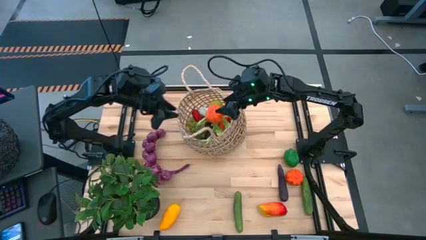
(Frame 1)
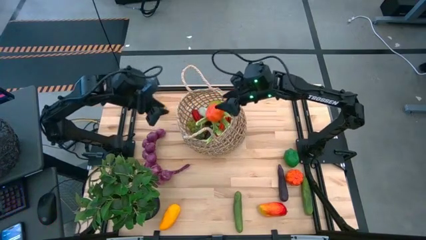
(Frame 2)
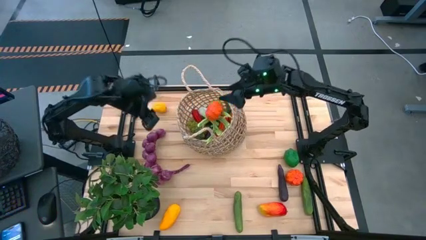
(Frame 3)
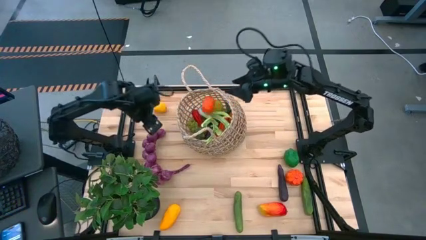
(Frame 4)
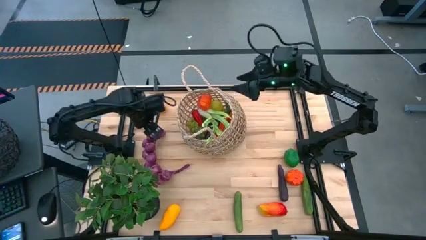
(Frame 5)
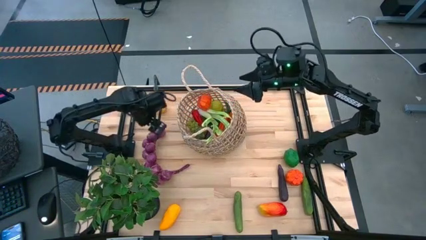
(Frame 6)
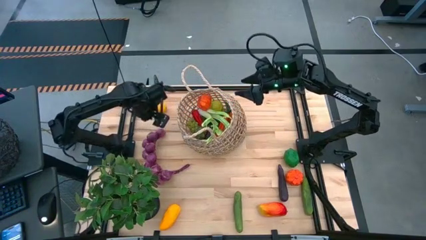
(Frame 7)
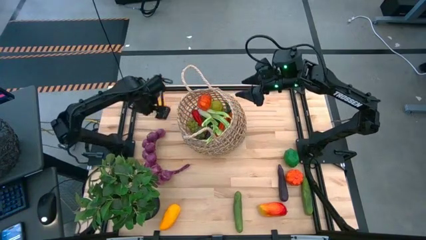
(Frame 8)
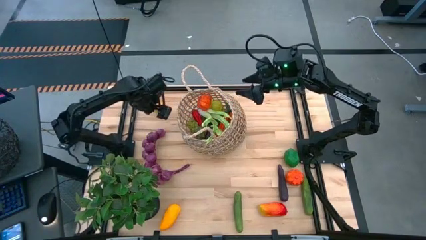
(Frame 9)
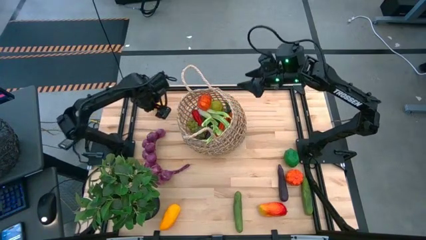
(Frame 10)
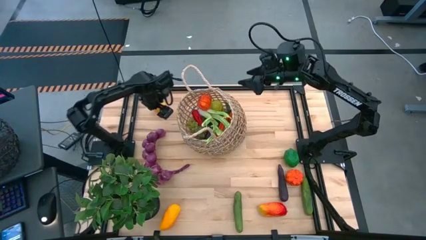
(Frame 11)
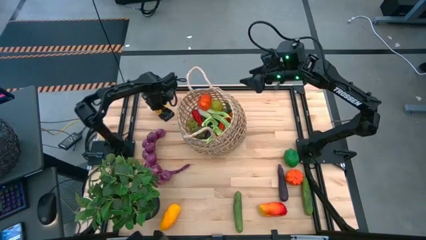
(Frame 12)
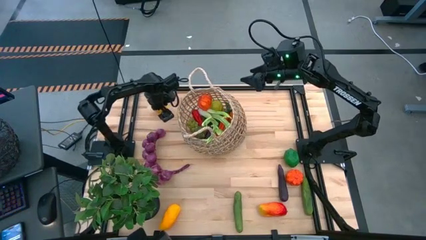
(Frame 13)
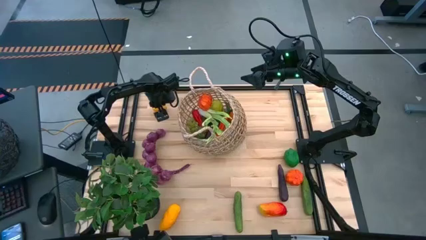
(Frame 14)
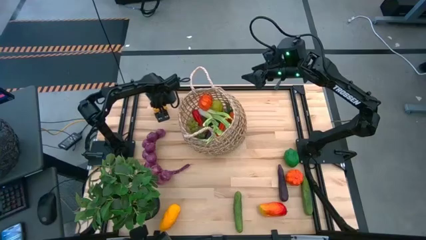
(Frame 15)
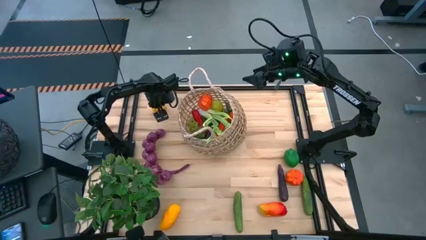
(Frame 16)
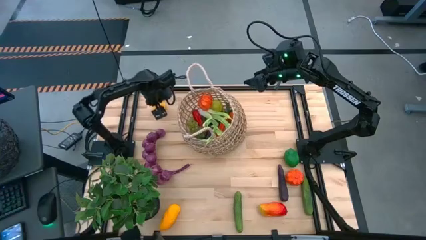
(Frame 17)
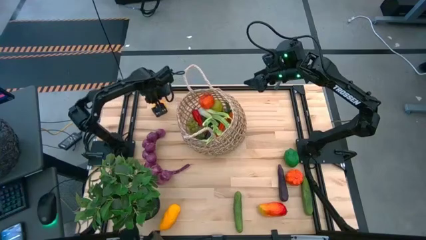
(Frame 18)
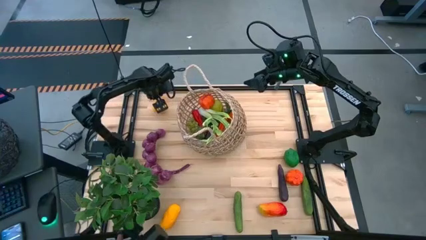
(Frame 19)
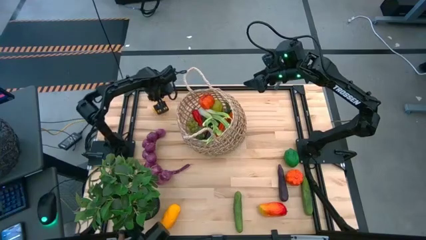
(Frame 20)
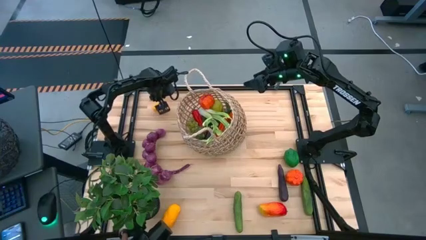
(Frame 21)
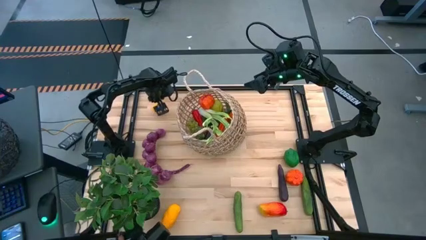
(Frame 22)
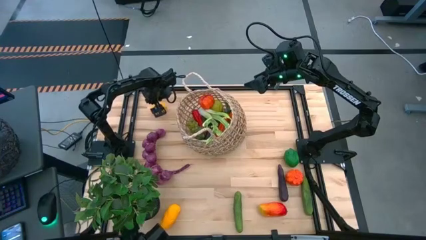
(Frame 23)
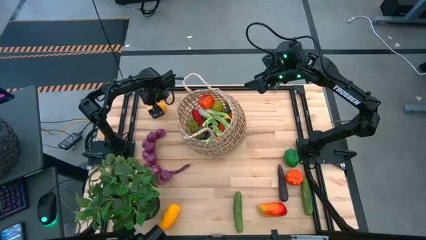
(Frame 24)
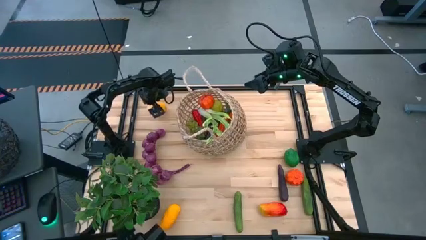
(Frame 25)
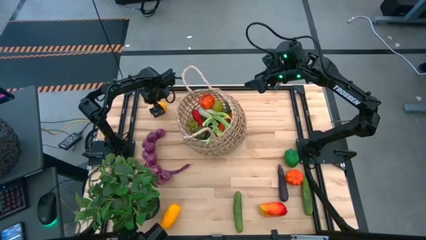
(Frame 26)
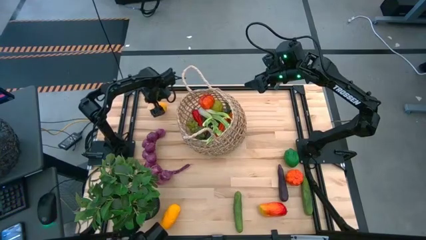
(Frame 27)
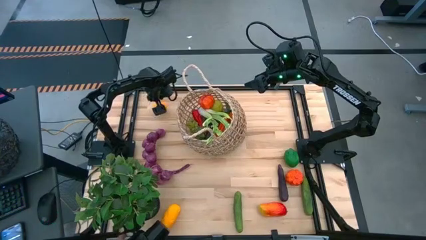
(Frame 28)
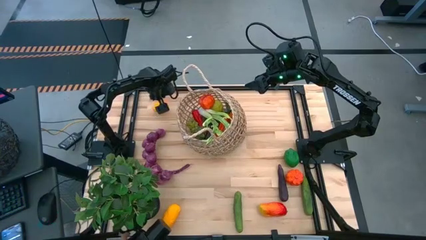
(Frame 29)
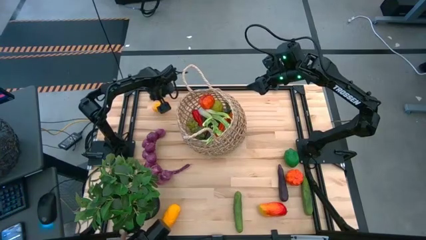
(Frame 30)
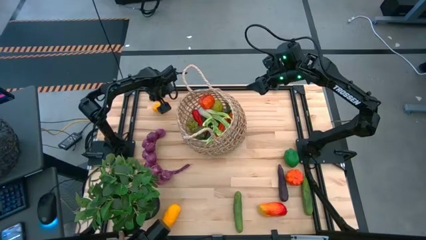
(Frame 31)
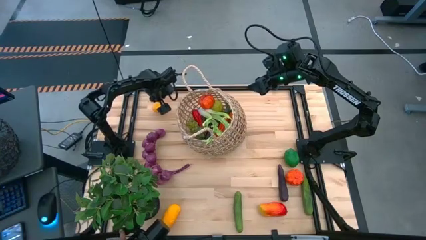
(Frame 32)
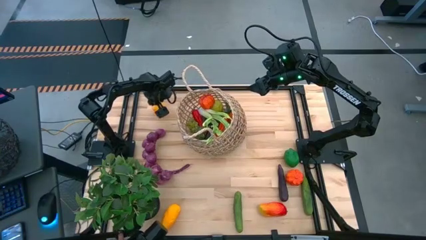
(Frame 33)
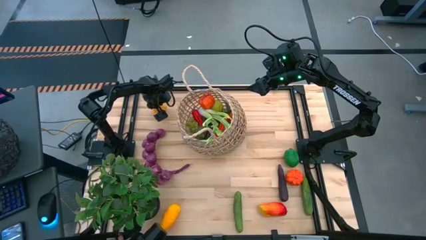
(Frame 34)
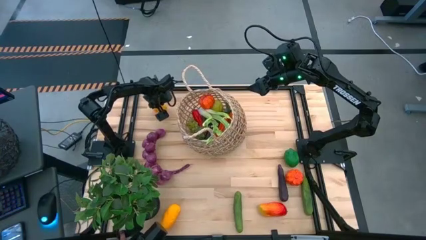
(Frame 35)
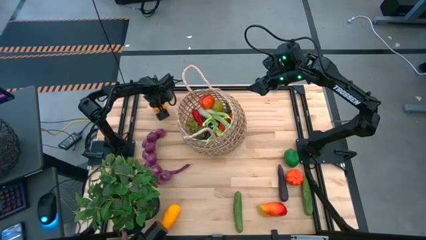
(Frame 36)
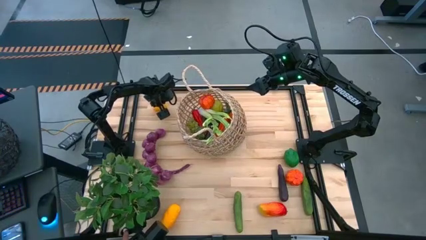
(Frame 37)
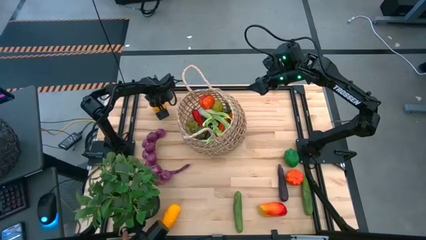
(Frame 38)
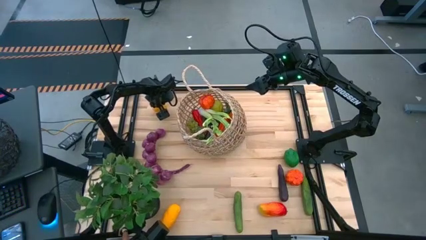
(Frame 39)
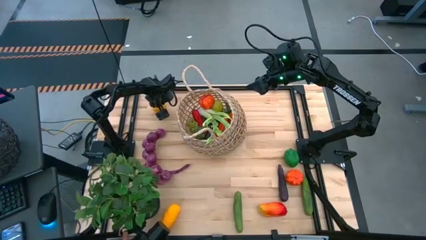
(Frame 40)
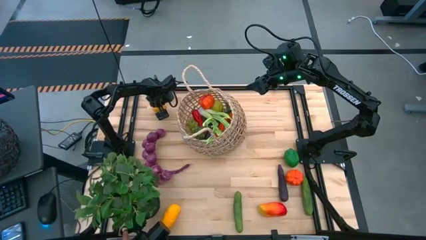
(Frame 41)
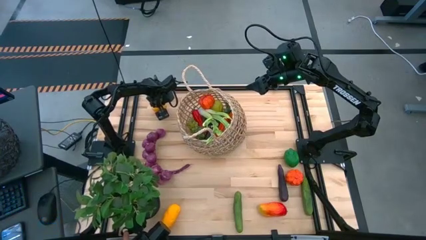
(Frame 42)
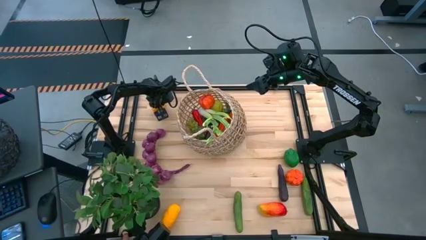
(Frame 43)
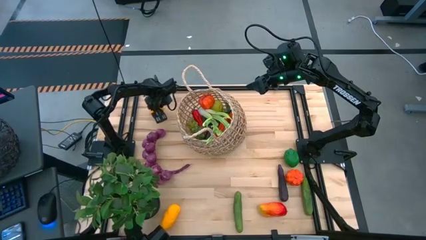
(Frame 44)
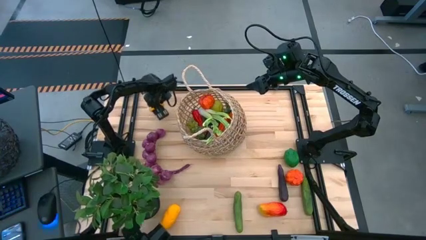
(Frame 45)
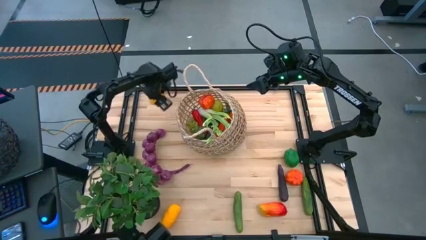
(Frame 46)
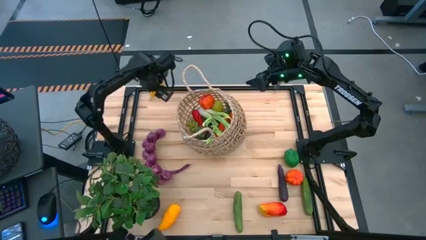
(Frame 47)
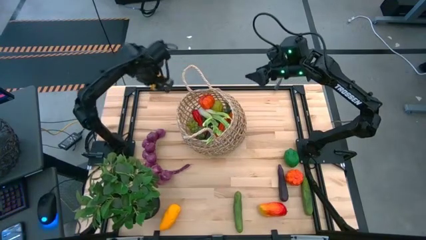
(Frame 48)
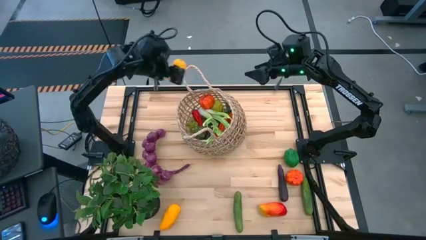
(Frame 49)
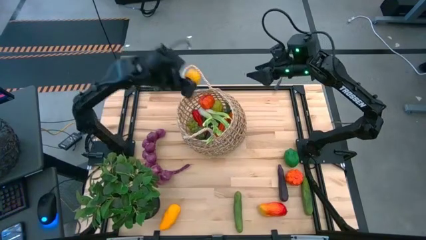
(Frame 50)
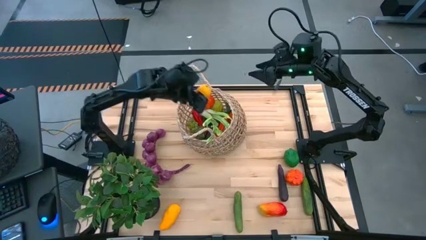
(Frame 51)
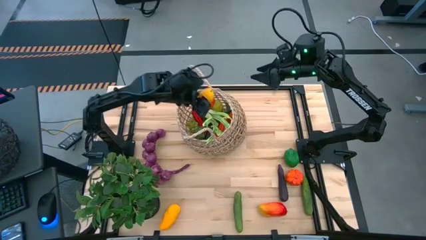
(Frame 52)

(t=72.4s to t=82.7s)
Task: Build produce basket
Put the lemon into the brown basket

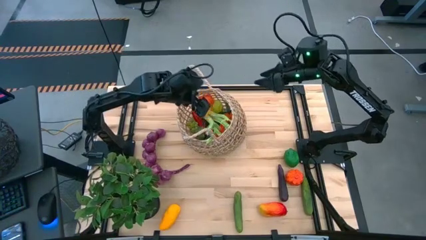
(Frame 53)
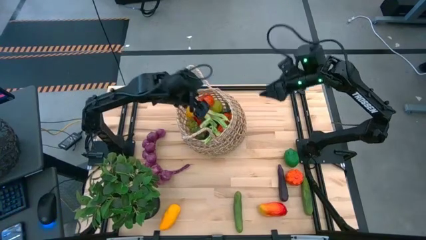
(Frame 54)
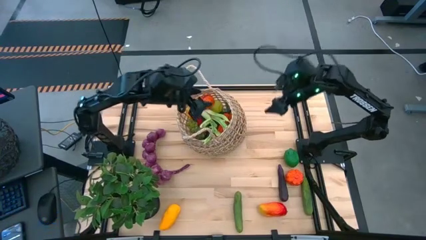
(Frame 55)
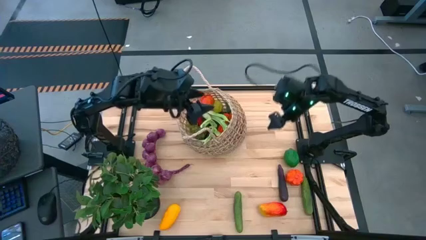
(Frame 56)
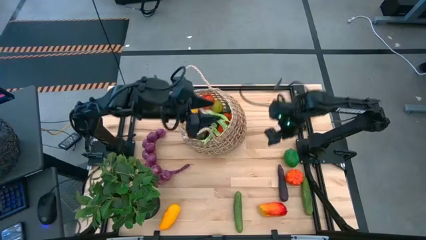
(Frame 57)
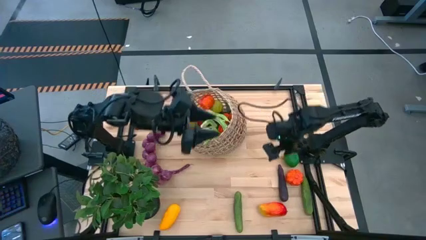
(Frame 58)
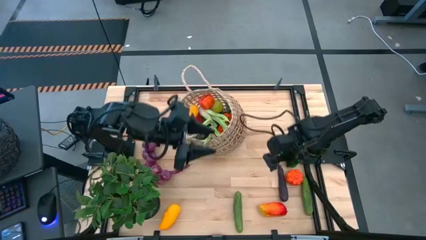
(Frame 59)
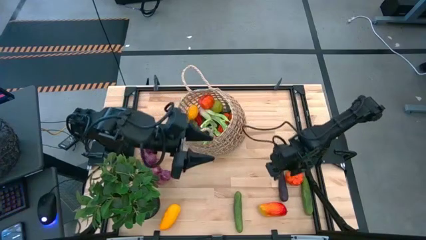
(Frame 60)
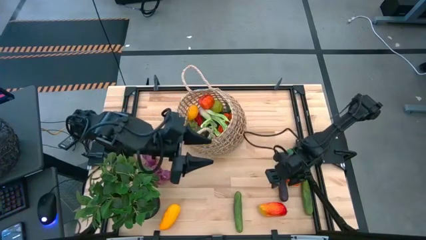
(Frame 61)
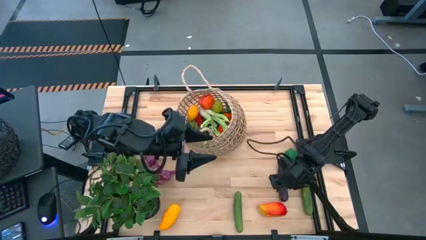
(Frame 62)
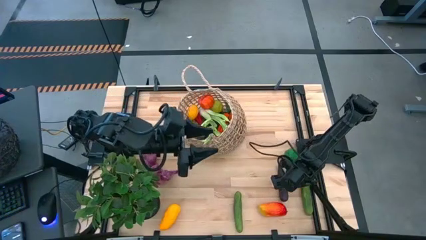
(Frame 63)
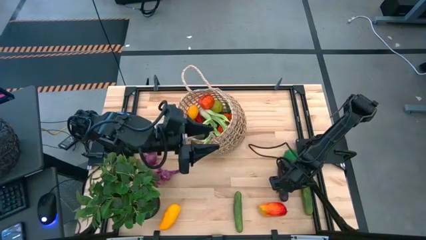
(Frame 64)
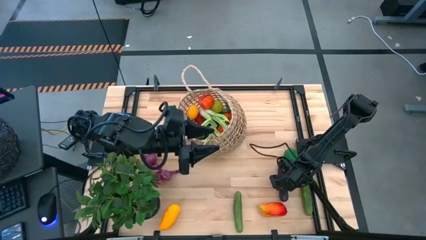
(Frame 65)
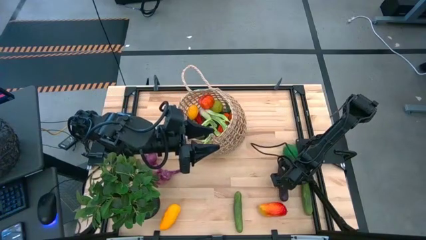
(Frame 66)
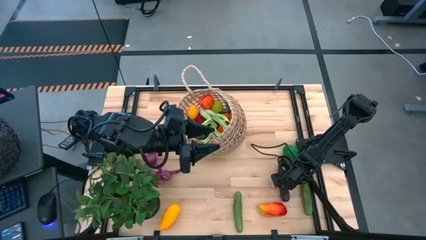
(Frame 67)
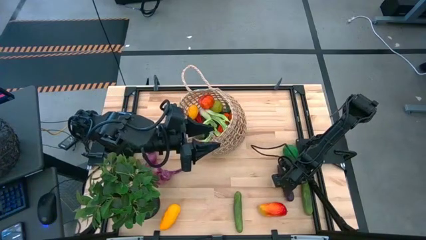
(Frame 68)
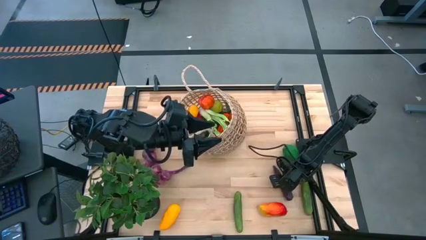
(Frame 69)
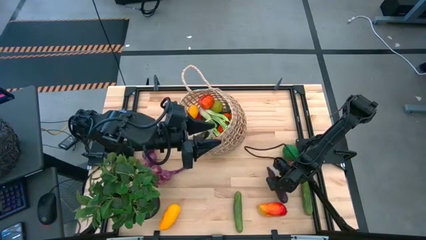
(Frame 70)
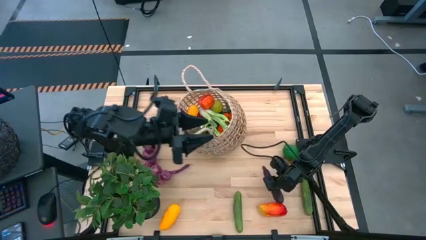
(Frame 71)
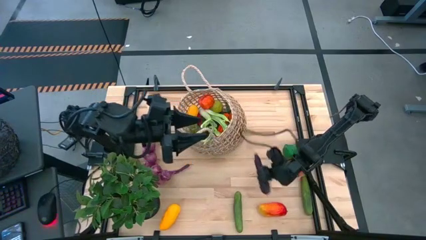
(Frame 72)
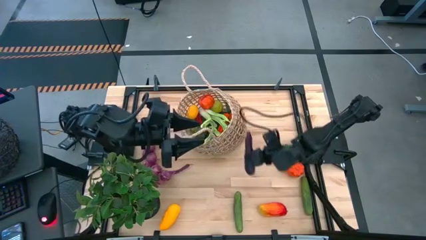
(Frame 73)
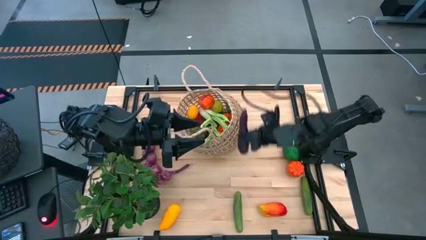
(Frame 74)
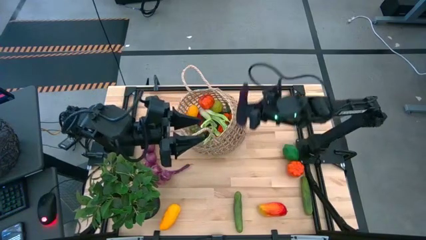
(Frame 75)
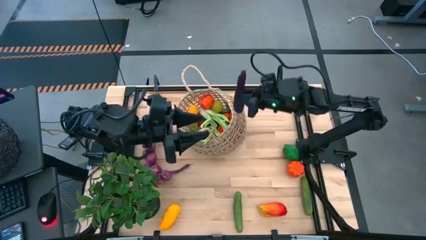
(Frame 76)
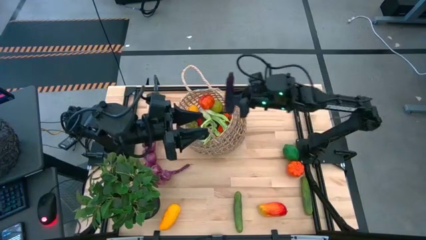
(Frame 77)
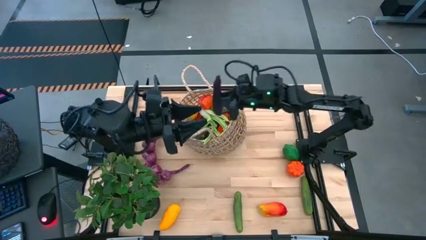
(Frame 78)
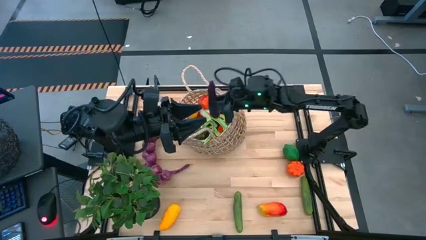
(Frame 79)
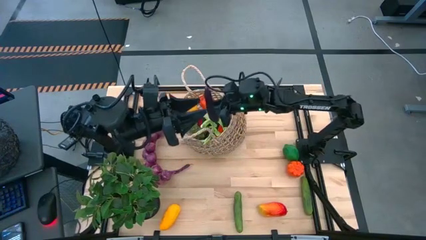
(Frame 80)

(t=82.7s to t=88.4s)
Put the eggplant into the brown basket
